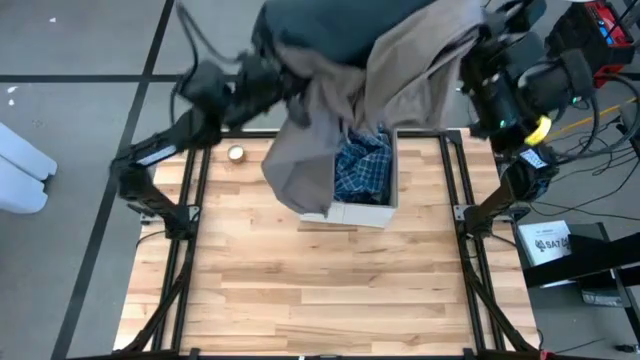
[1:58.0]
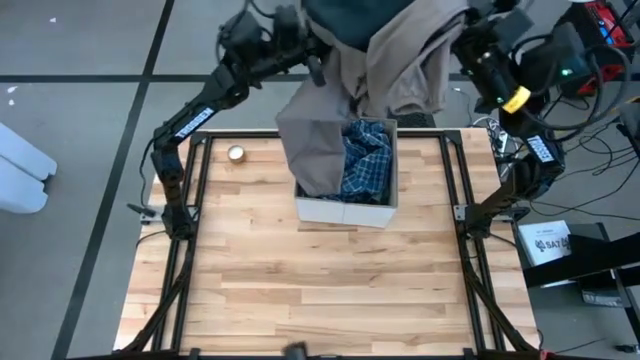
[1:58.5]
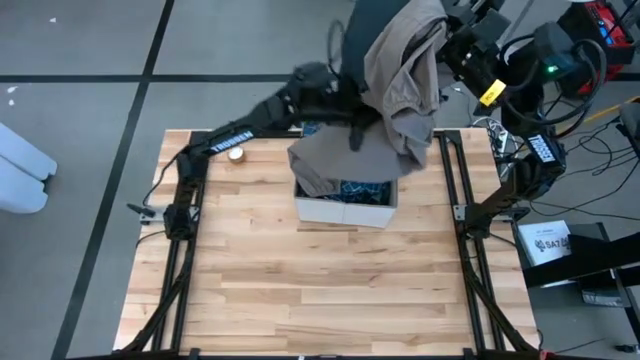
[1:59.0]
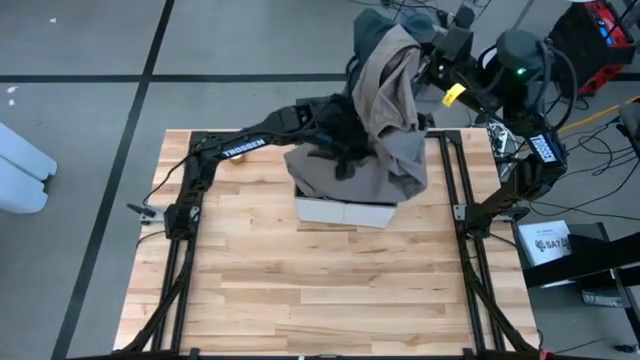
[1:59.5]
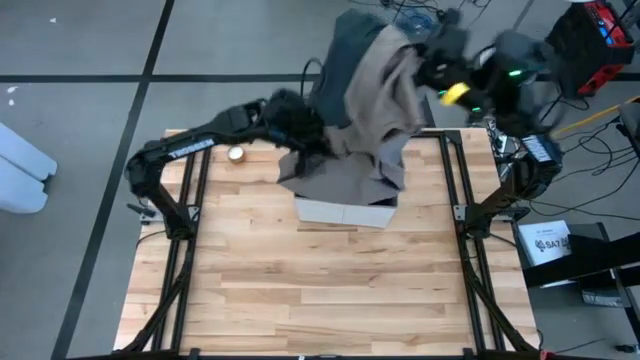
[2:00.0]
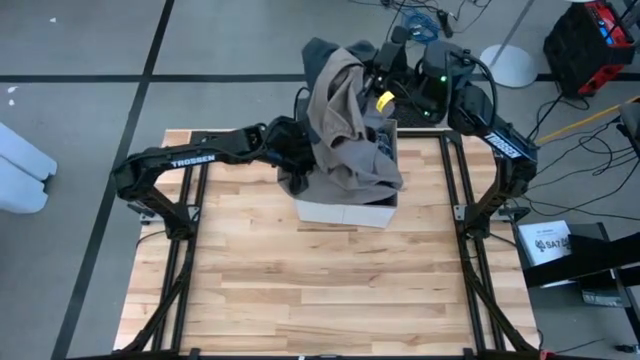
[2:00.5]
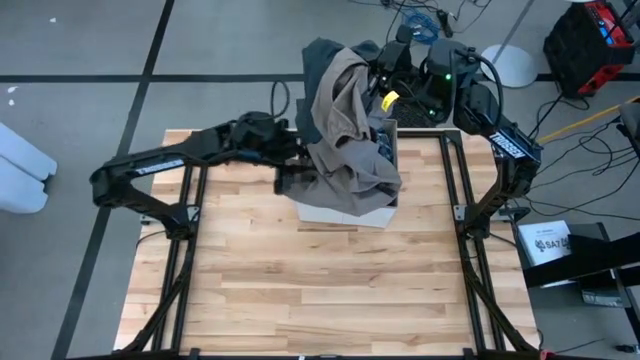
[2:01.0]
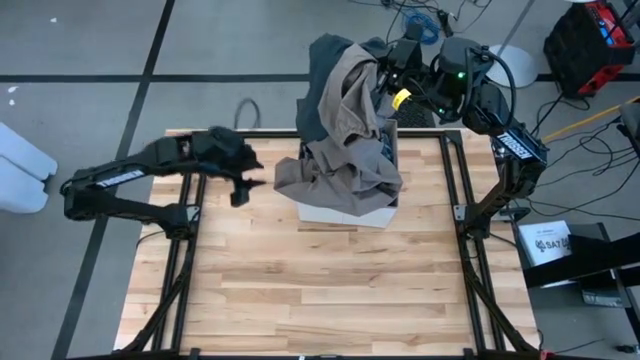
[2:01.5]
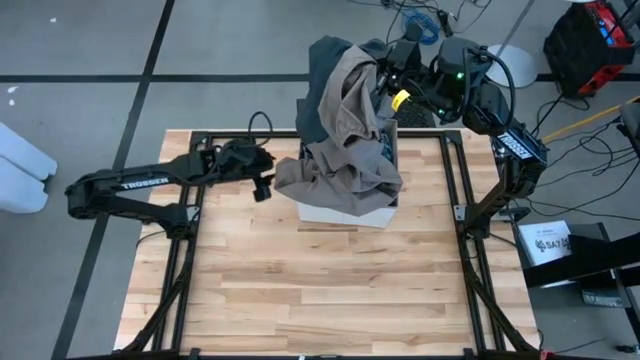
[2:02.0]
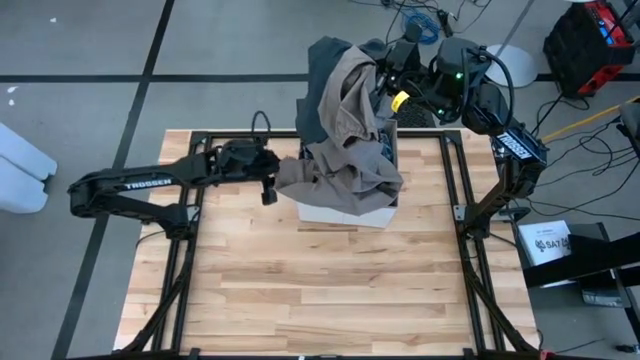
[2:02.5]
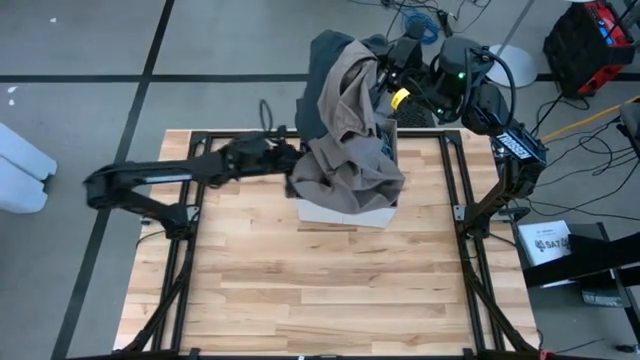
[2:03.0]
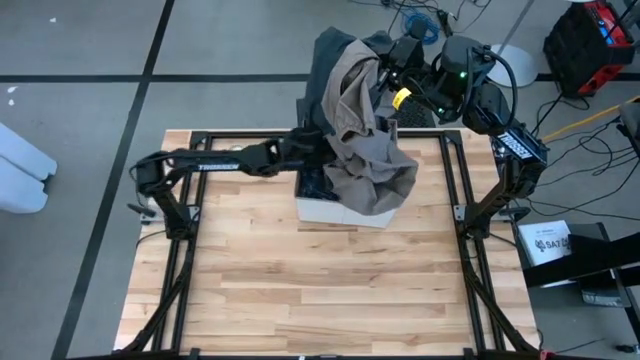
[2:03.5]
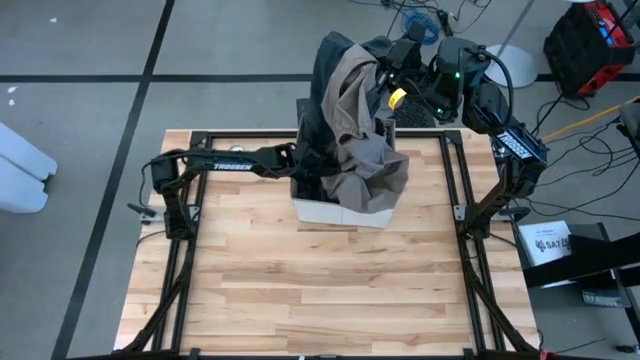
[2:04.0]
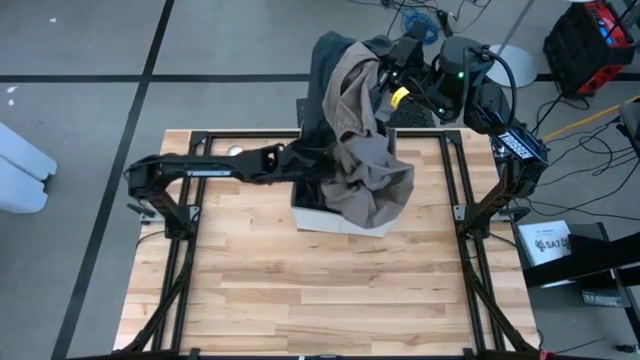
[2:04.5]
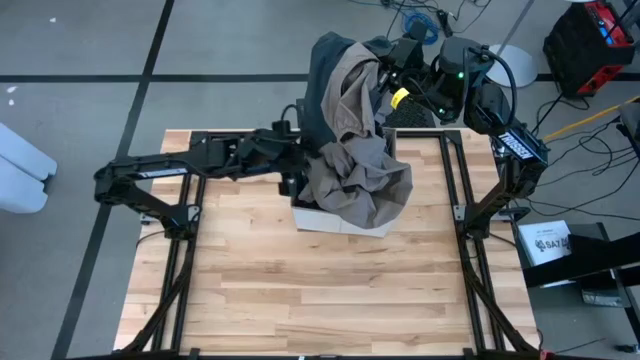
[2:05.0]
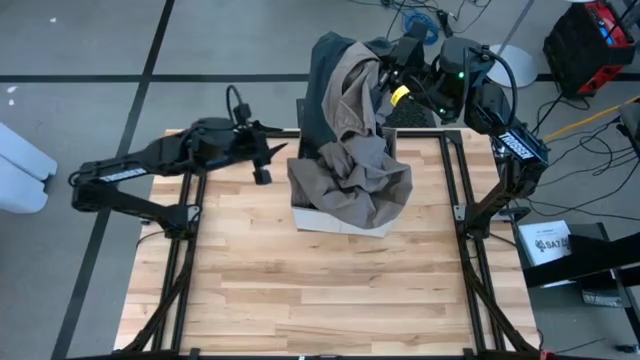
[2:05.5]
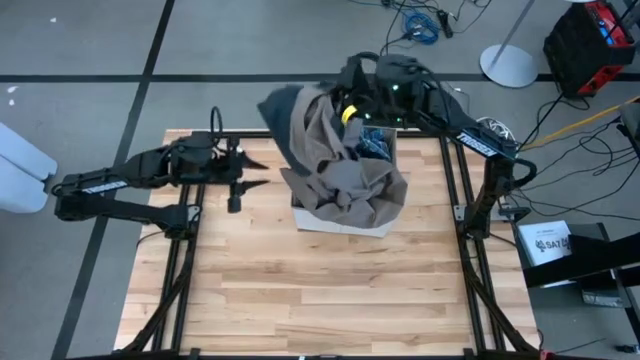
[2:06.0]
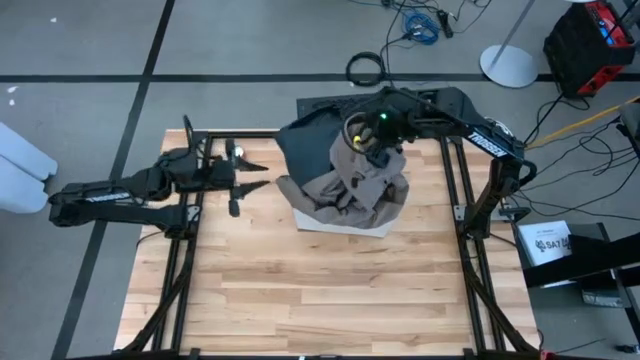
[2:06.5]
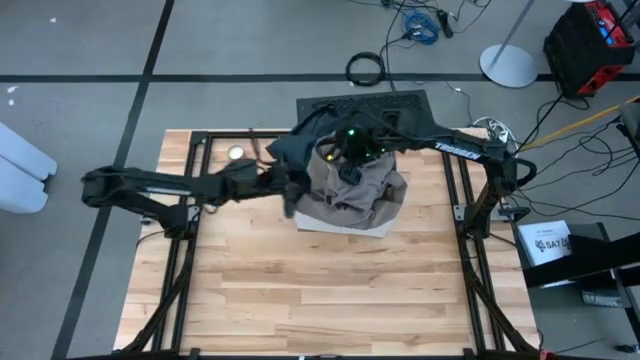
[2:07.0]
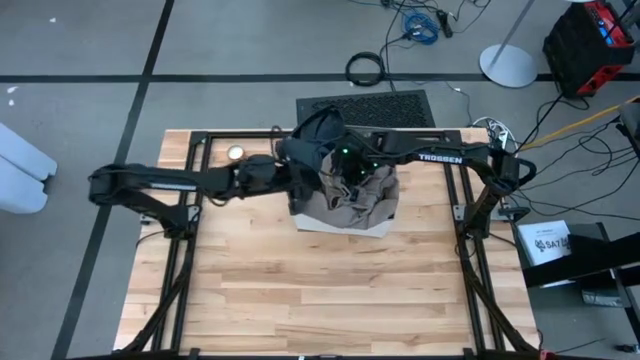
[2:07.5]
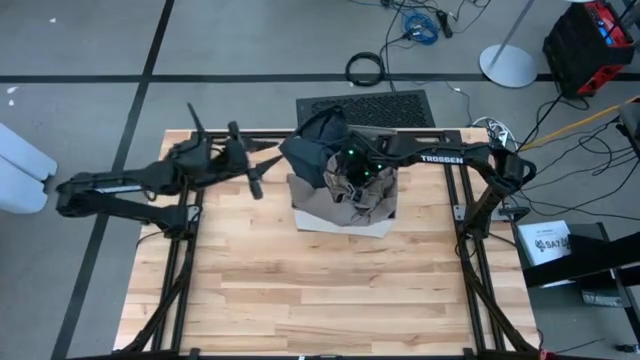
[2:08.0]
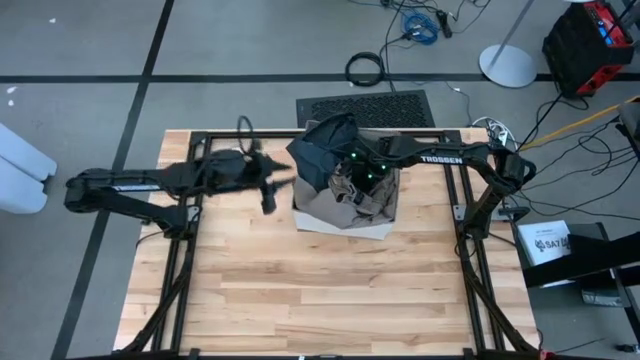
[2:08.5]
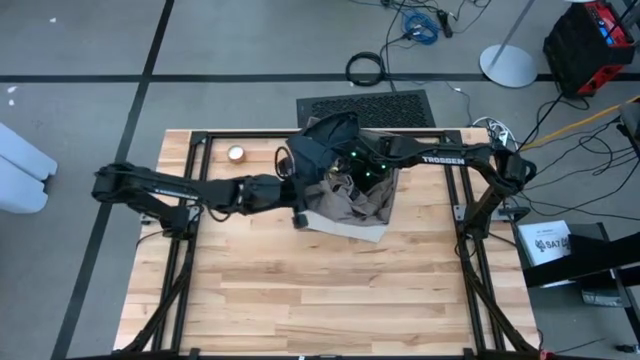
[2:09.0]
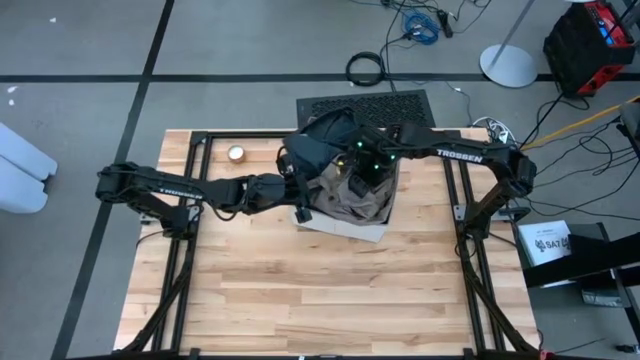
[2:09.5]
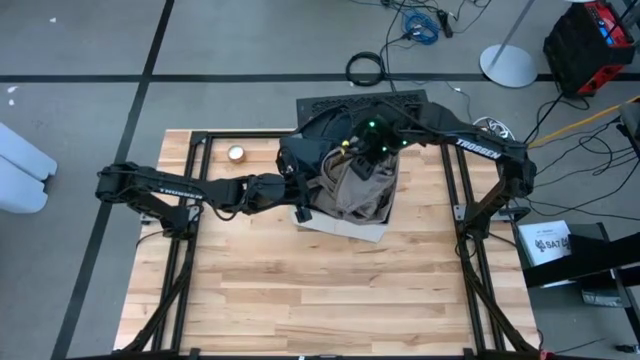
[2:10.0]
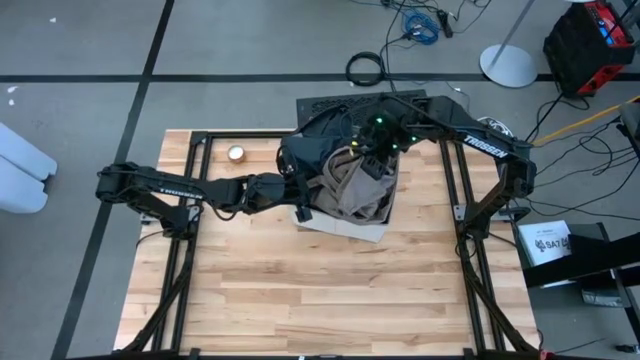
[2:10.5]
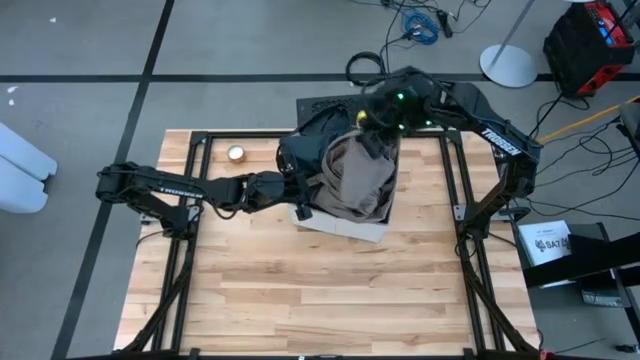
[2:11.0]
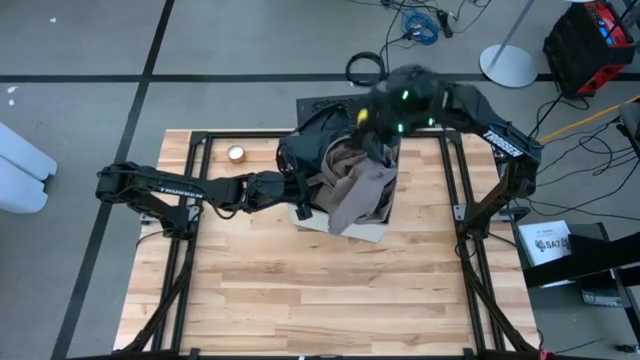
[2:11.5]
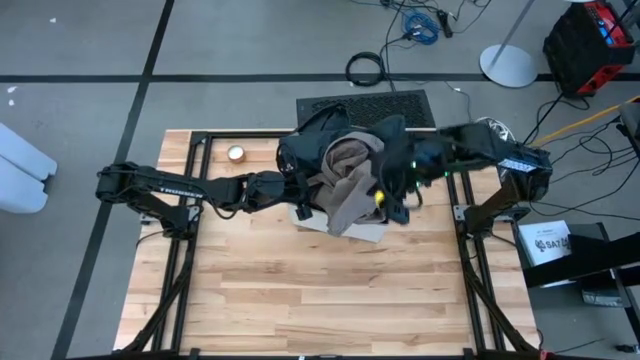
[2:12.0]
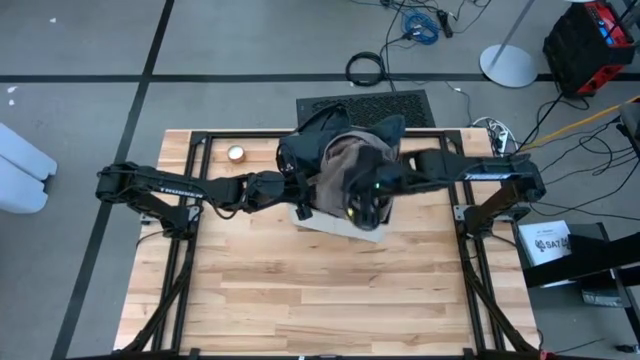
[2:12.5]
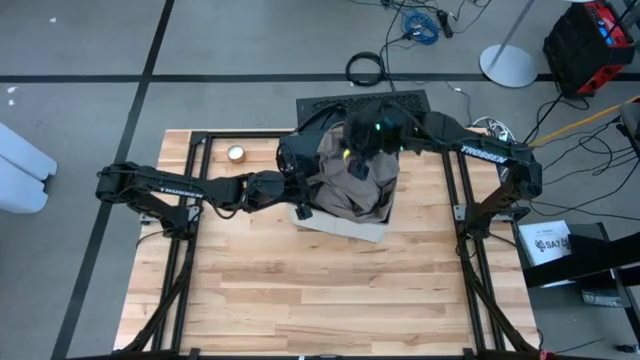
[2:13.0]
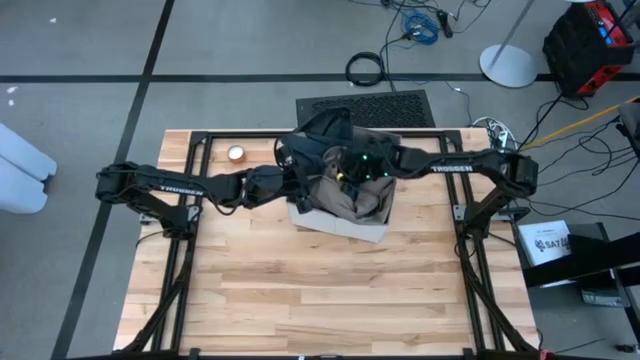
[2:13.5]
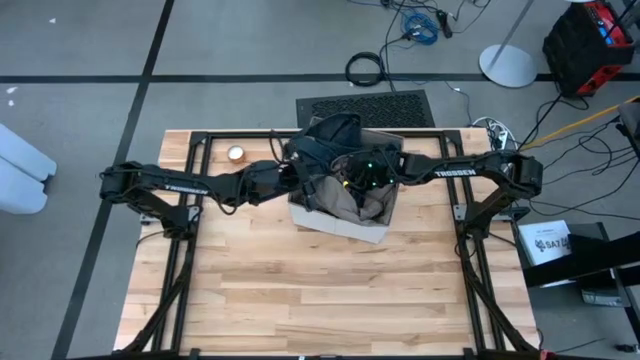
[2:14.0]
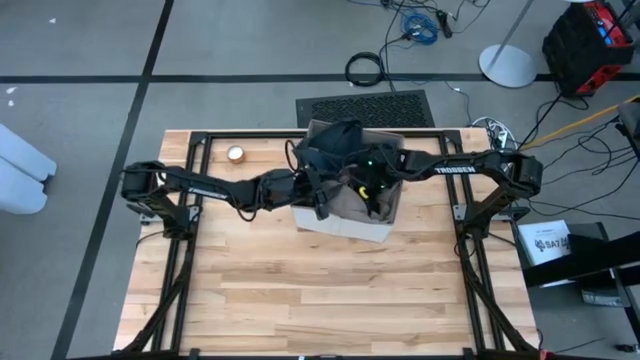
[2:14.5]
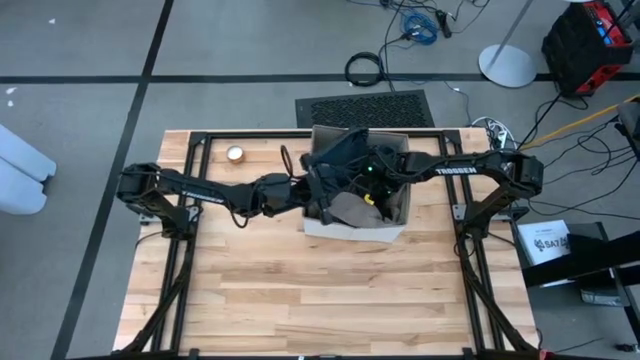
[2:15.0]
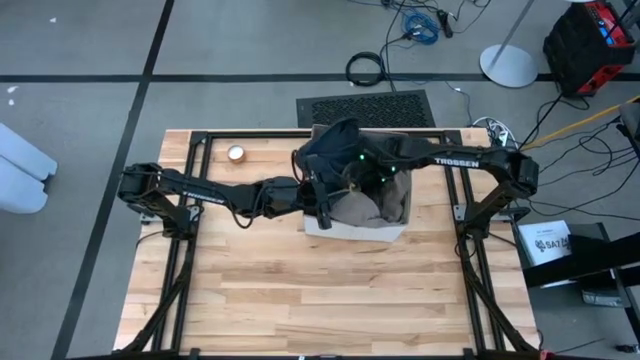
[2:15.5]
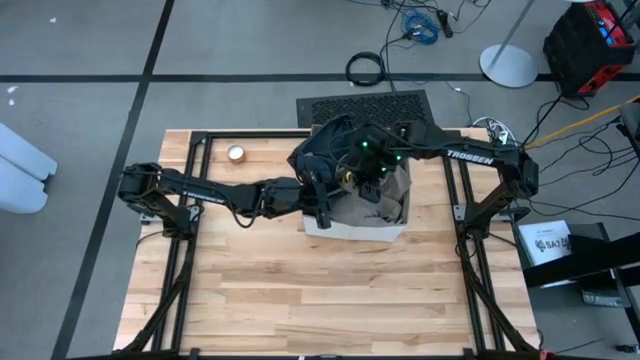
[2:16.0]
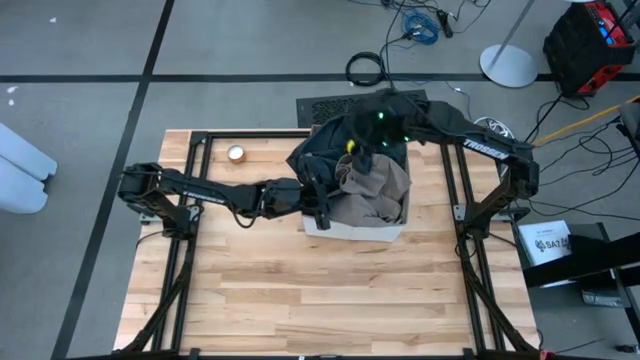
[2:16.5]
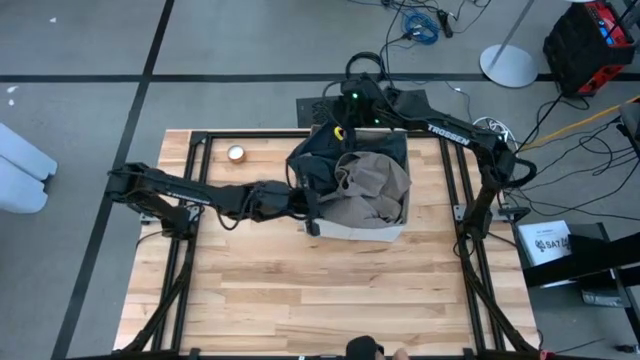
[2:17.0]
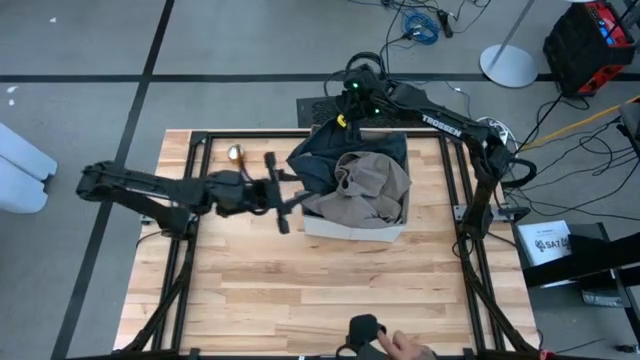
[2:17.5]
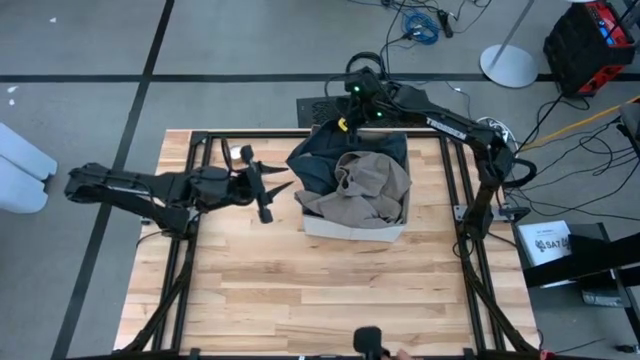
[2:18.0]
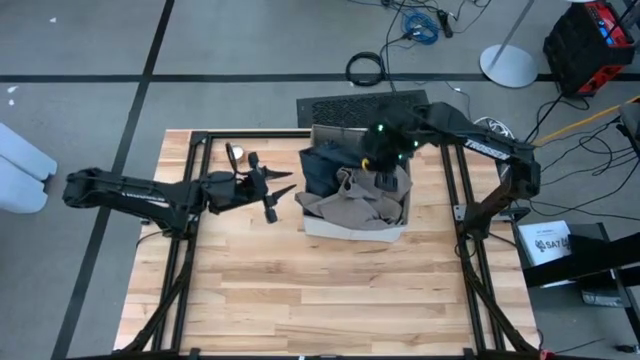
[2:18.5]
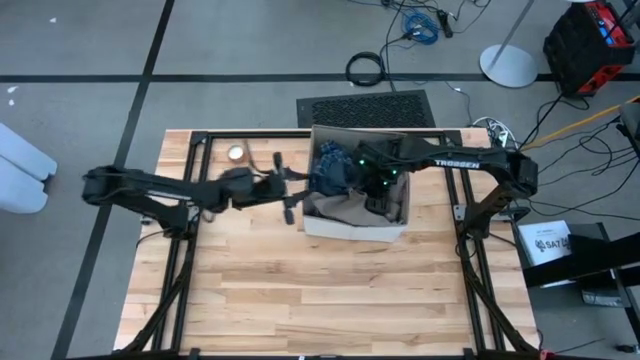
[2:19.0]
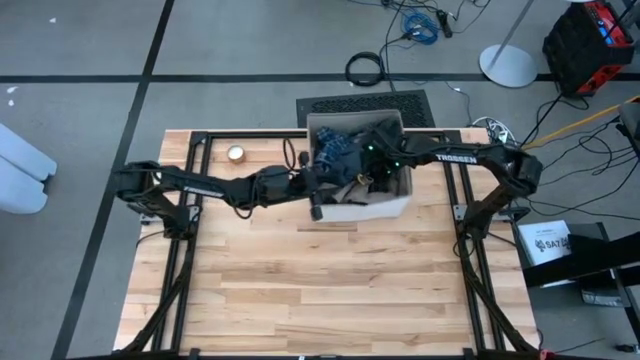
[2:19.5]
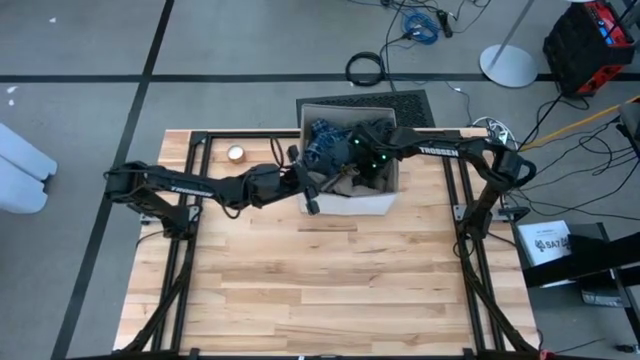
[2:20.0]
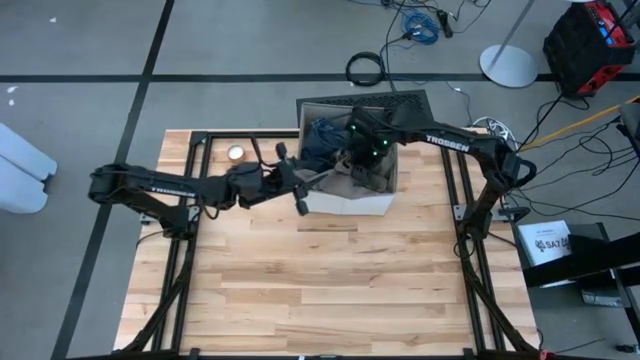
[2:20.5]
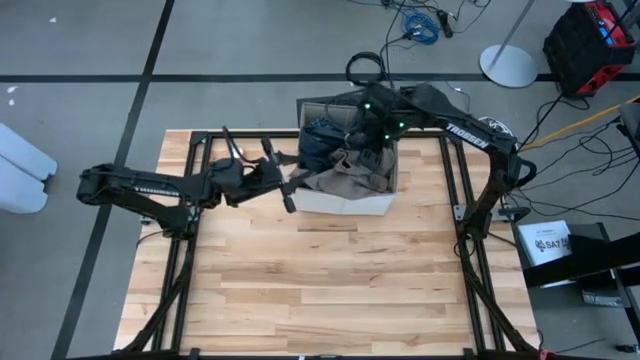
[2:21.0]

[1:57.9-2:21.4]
Task: Sort clothes
Put the green and brown jacket into the laundry organizer
